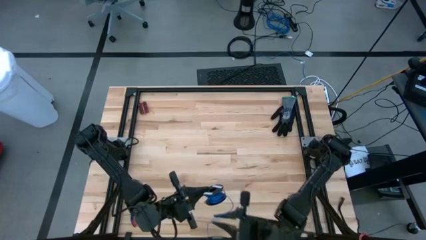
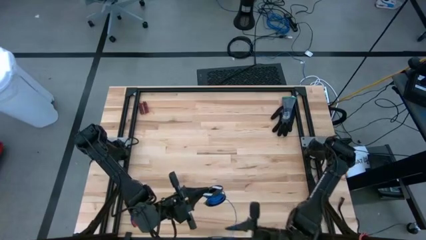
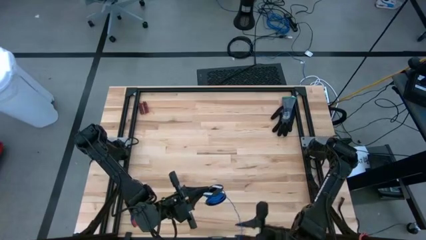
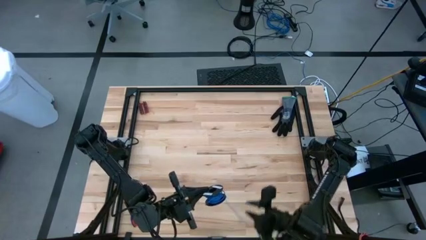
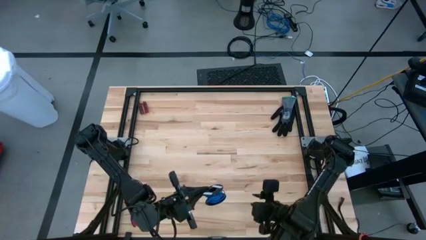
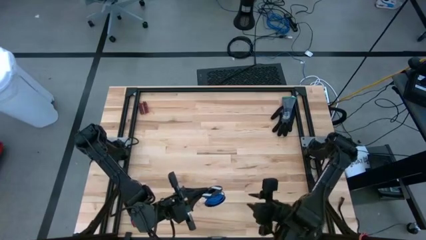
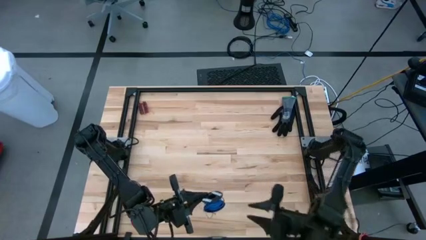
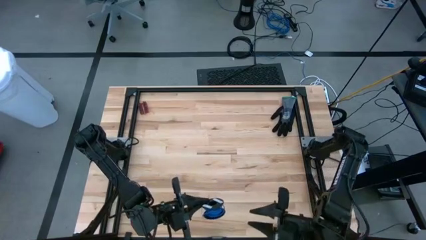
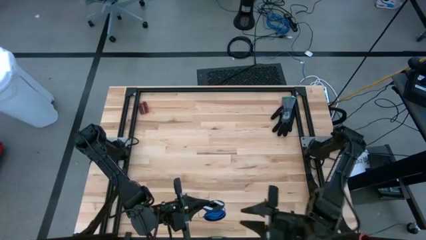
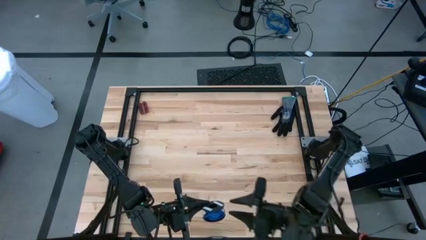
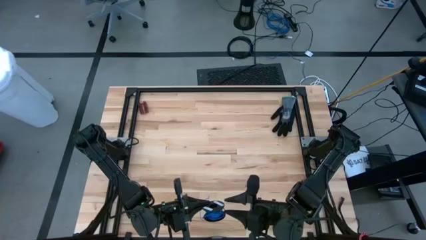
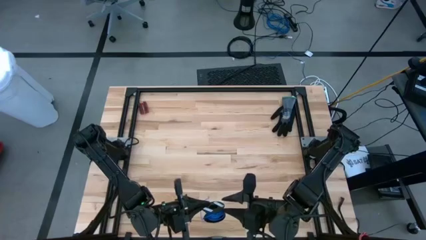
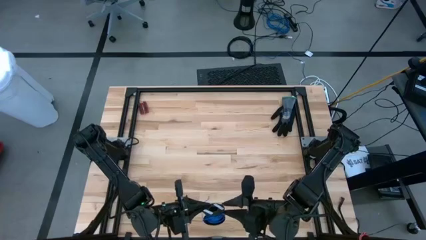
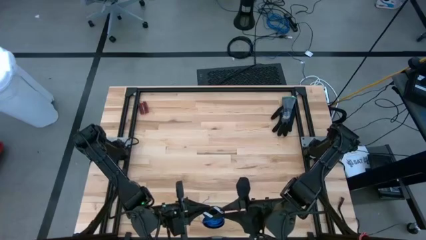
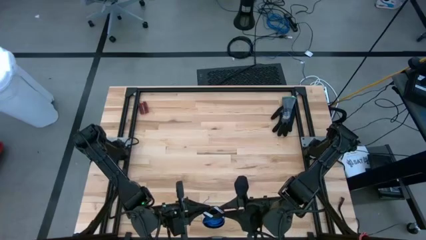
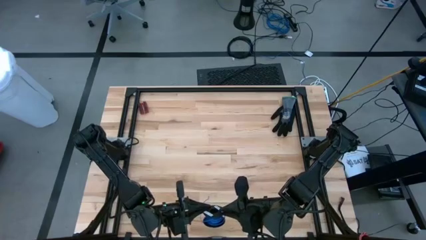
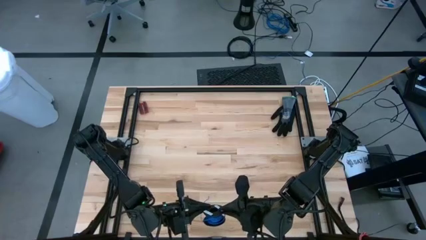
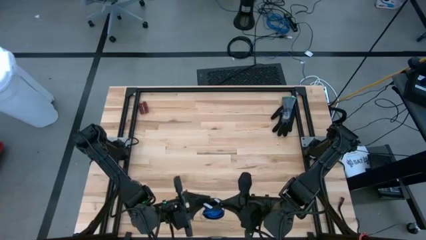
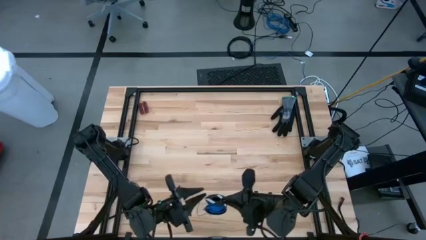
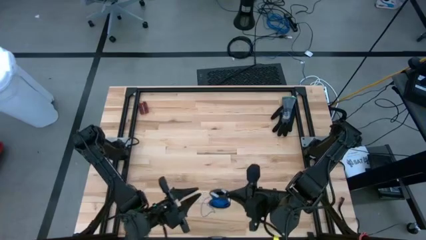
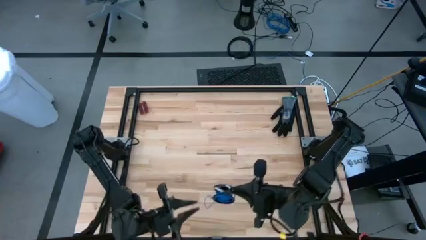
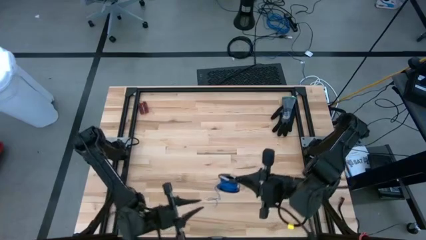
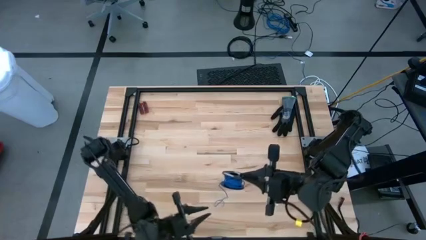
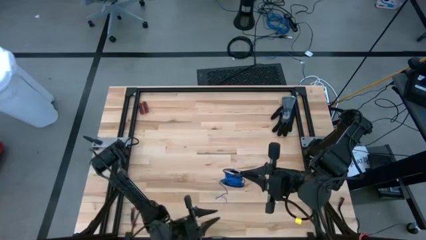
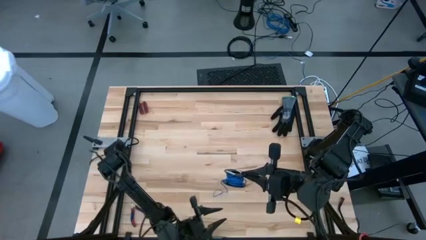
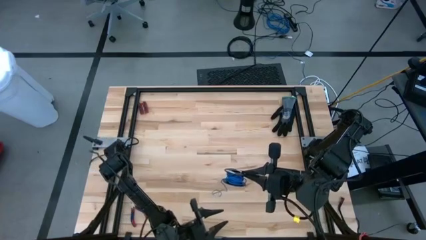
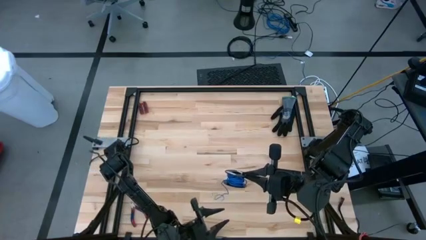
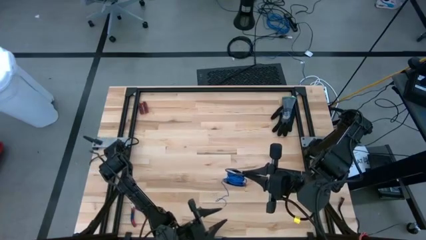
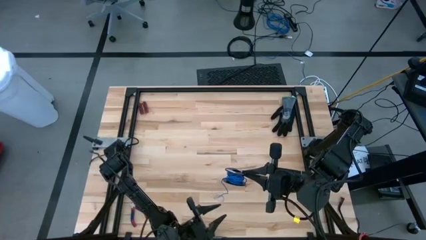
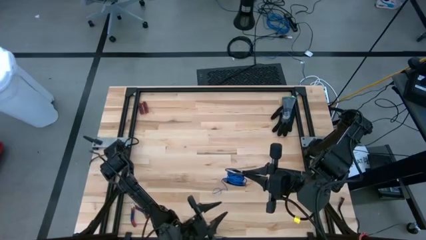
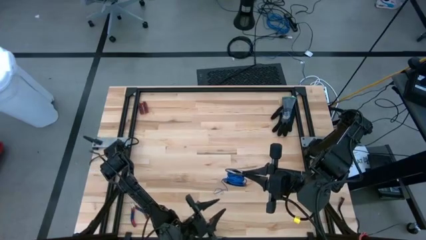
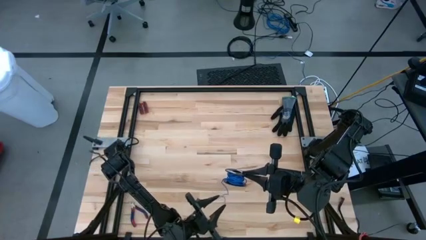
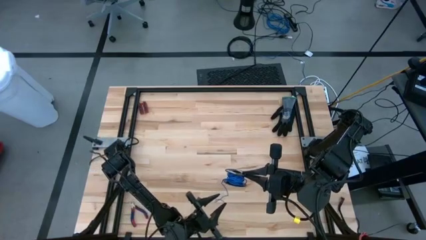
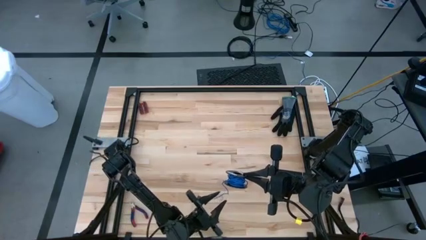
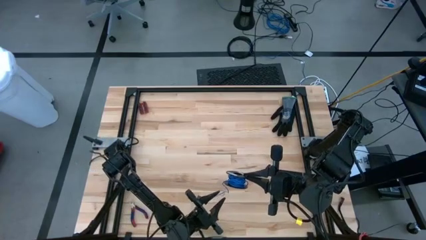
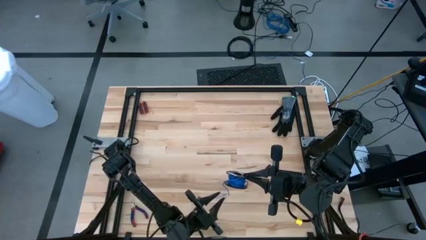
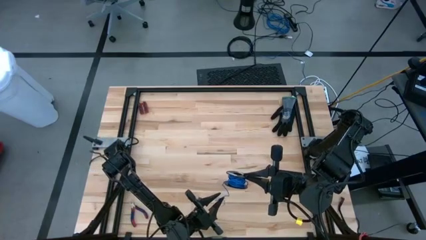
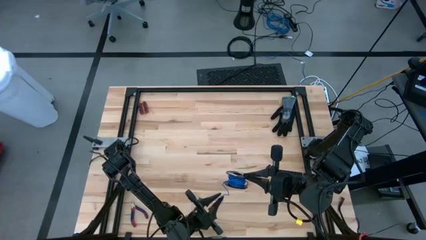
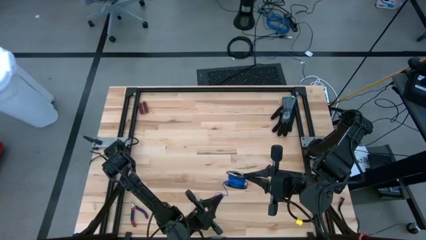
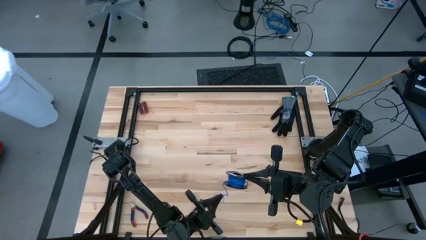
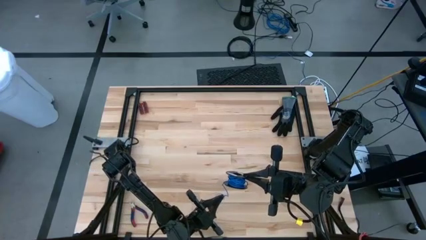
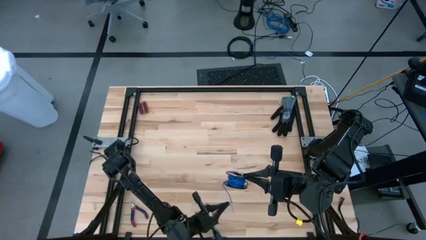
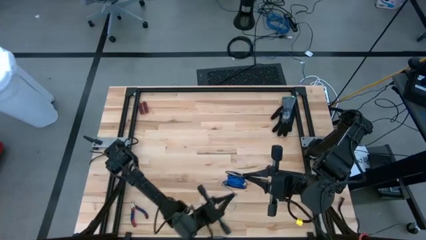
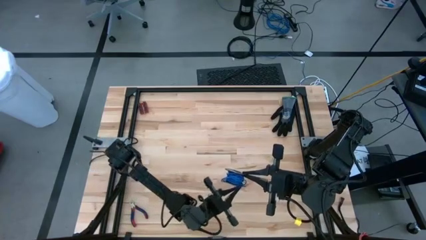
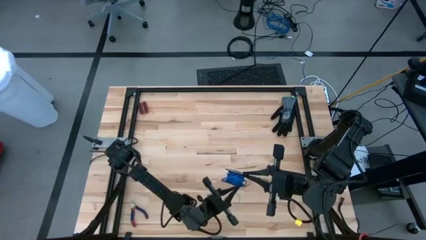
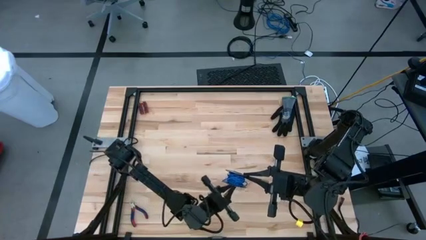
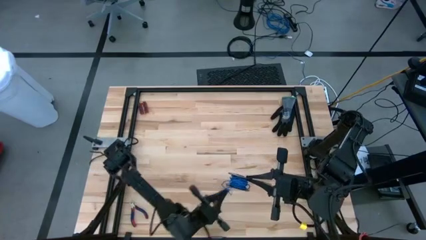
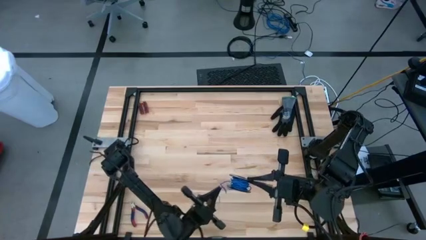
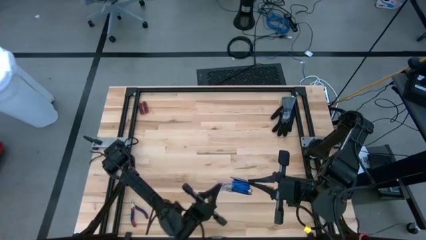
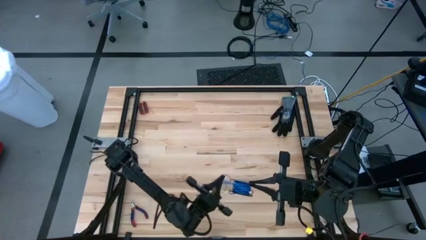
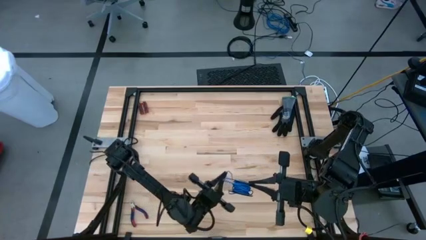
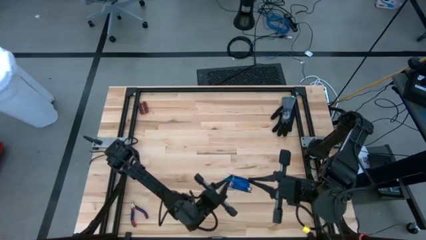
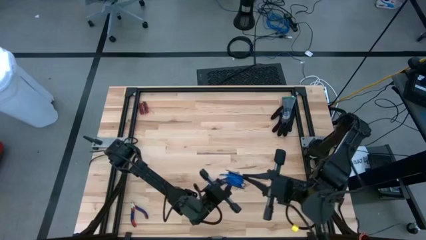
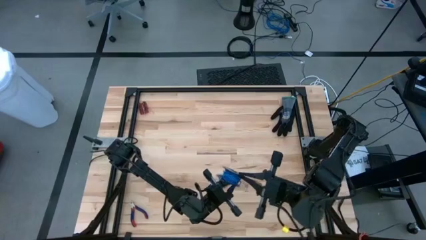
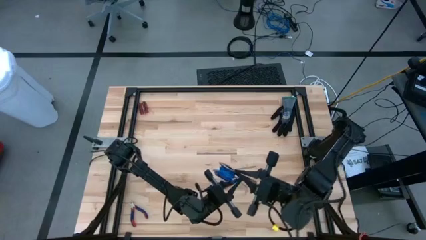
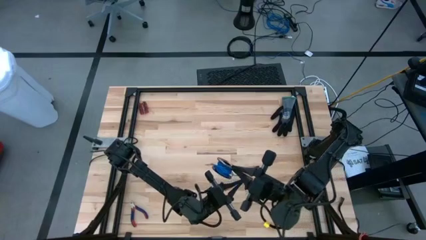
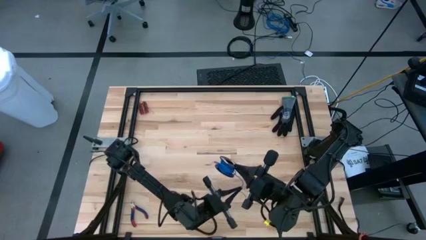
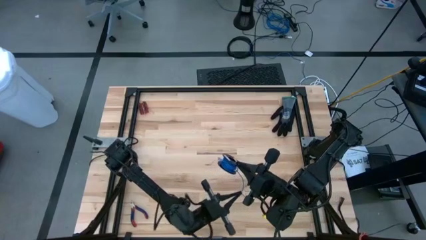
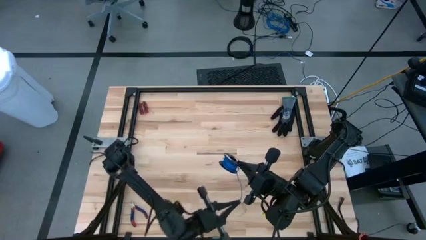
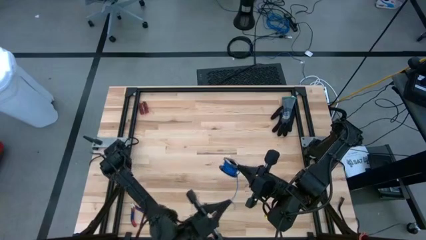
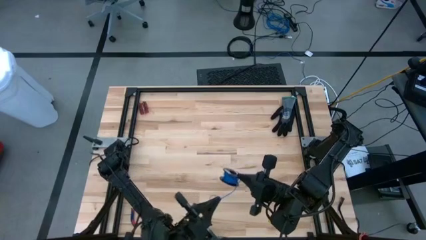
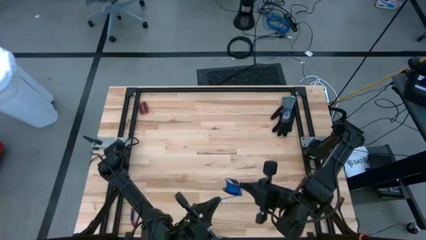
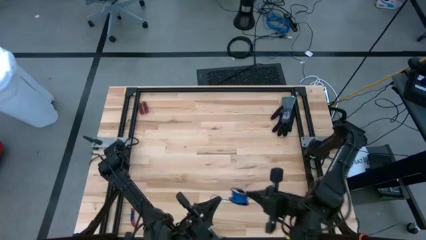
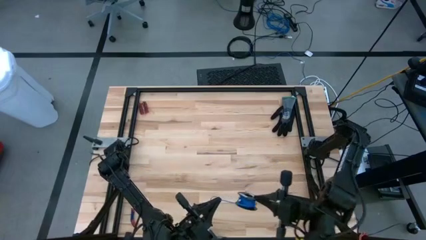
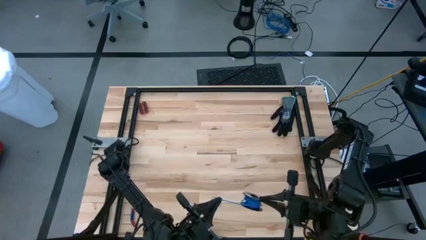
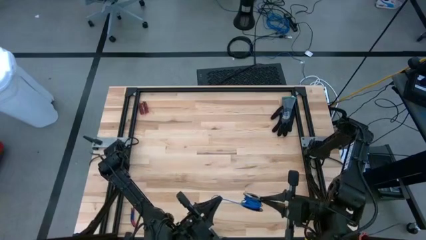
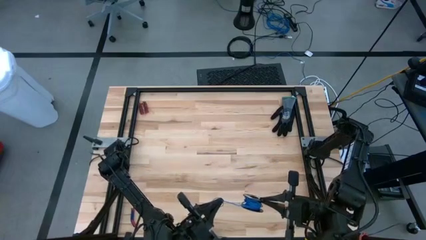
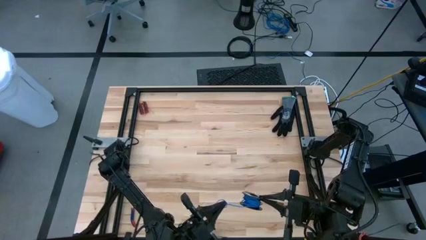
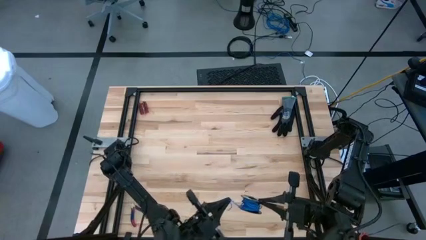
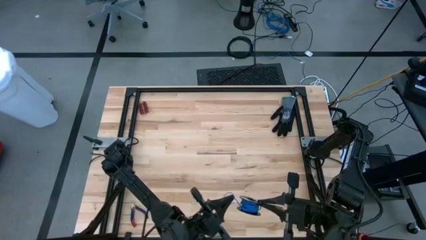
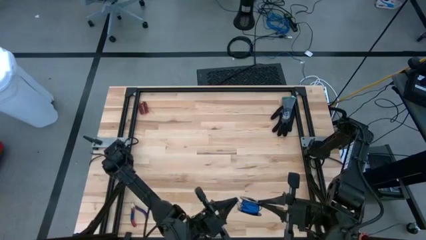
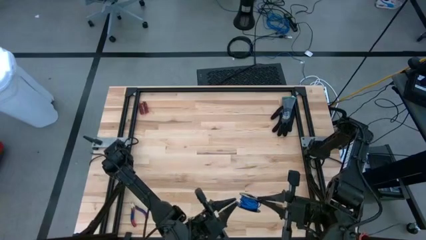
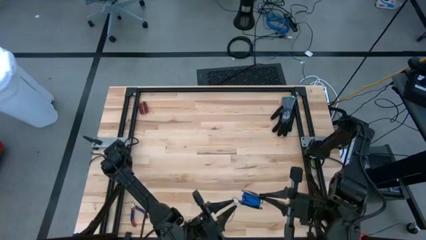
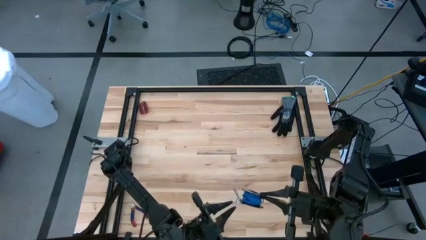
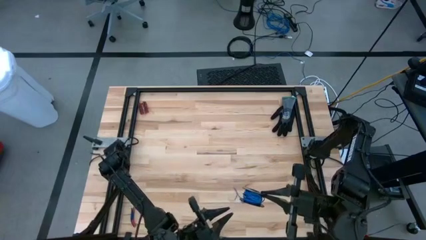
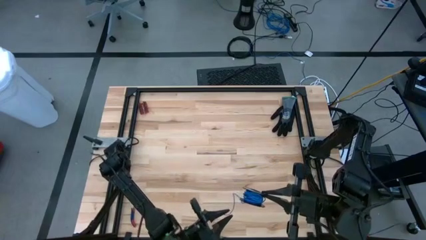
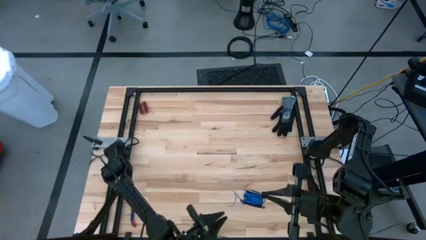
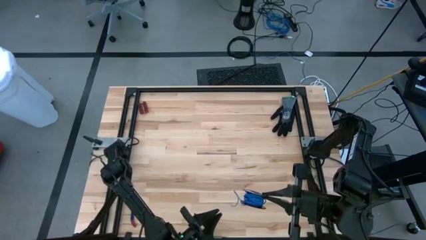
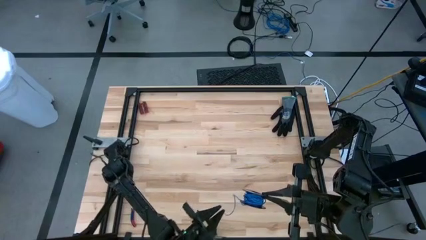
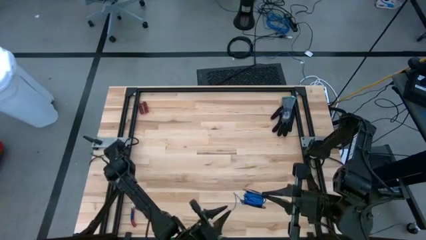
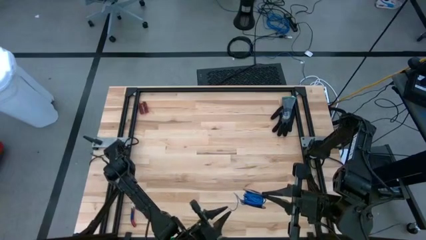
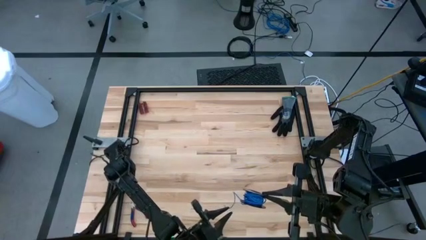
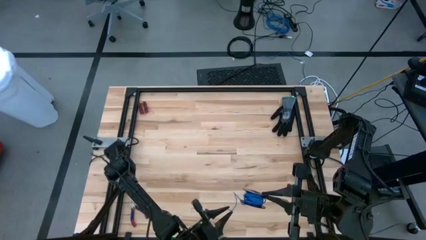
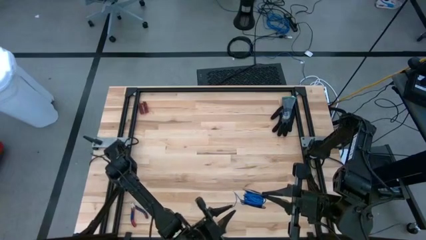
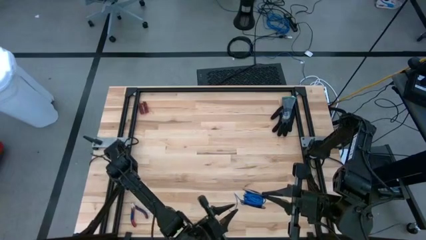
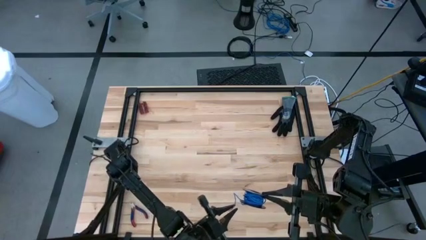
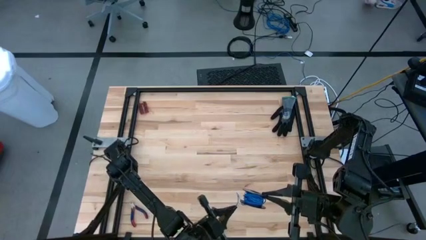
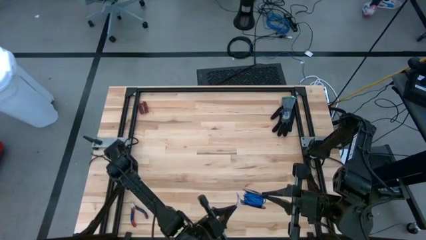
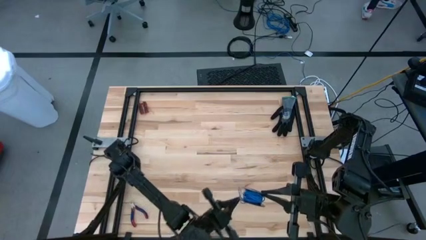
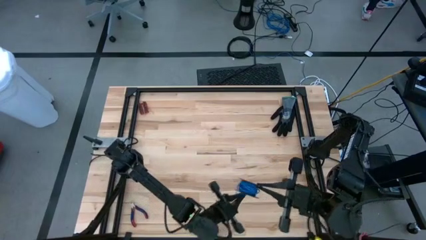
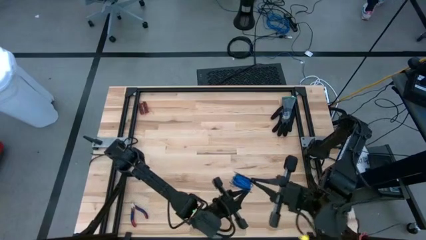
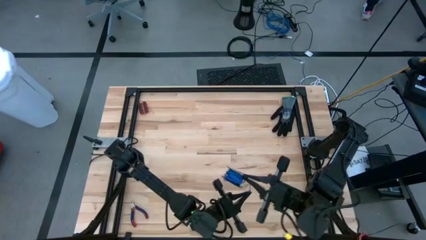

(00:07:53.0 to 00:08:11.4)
Task: Coil cords
Coil the blue wire onto a spool
